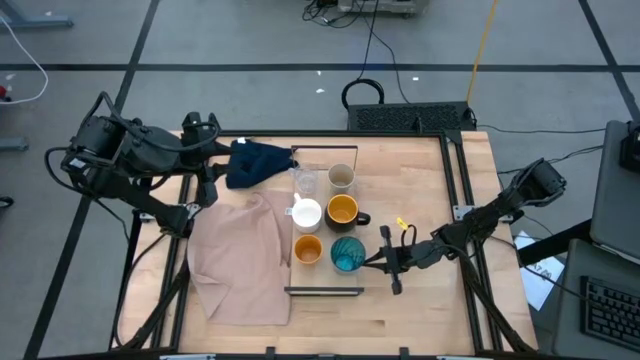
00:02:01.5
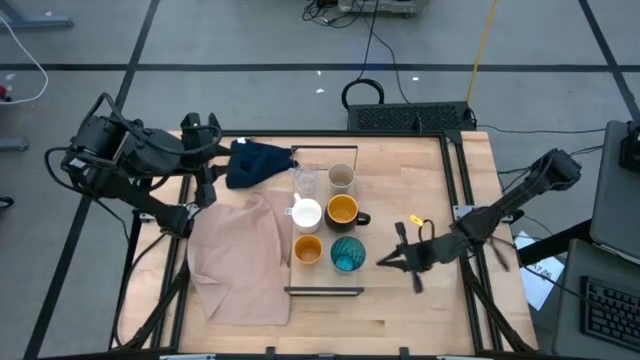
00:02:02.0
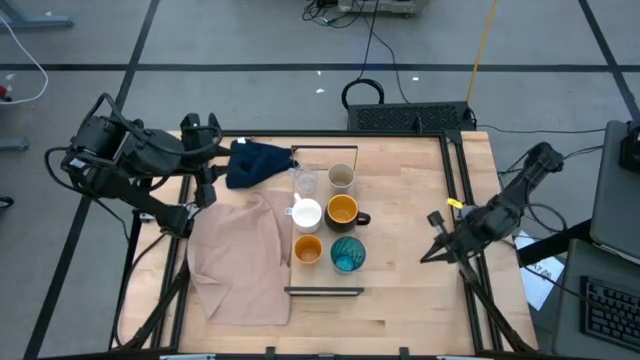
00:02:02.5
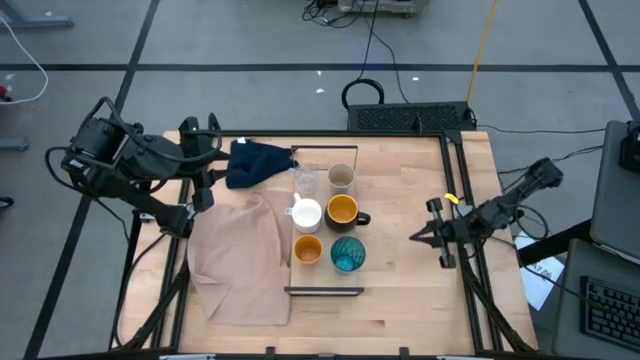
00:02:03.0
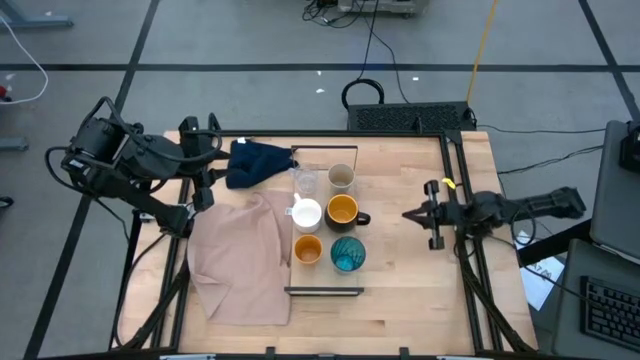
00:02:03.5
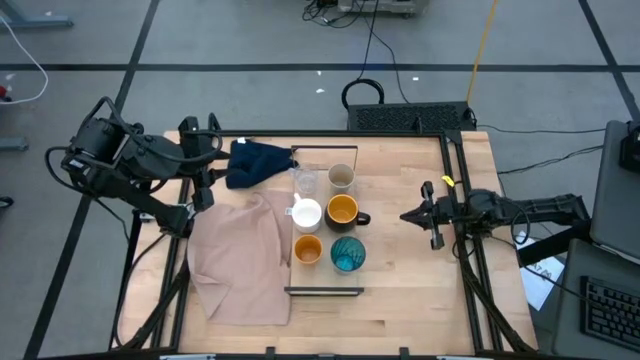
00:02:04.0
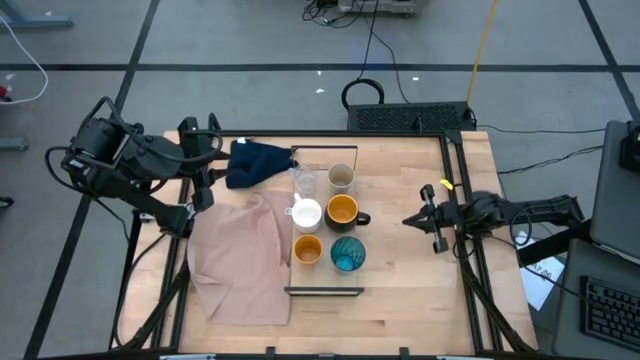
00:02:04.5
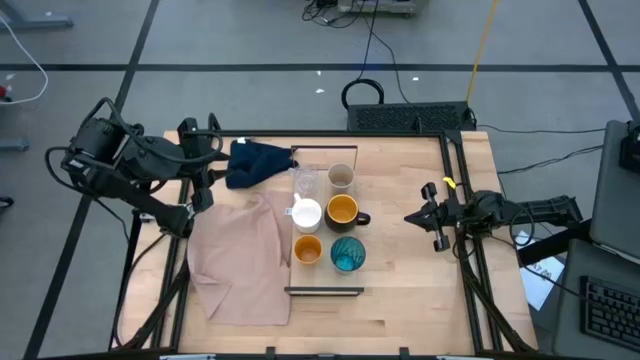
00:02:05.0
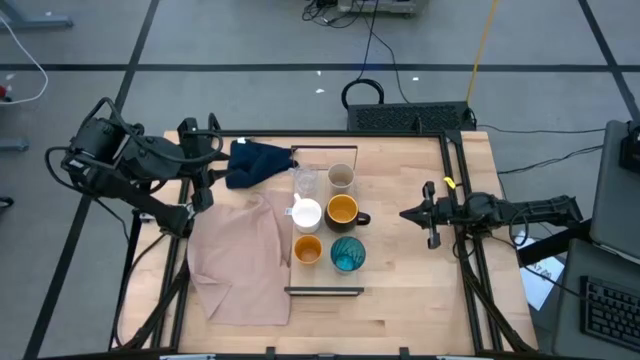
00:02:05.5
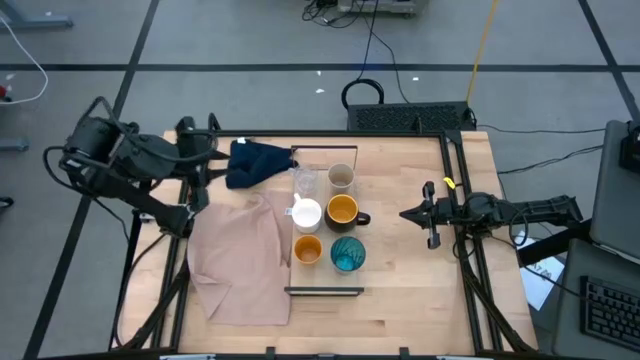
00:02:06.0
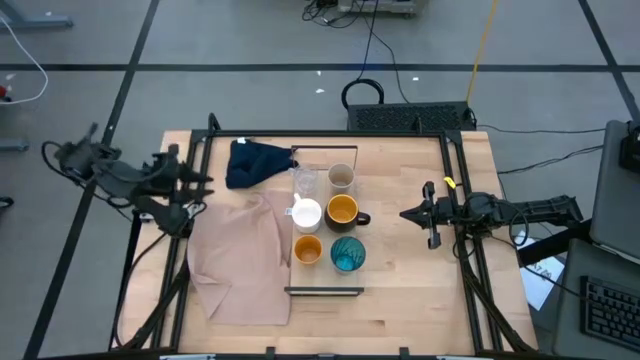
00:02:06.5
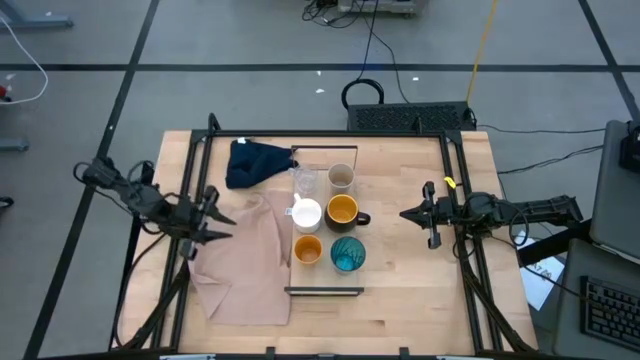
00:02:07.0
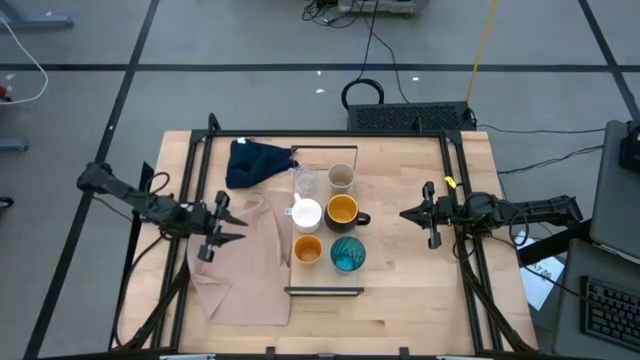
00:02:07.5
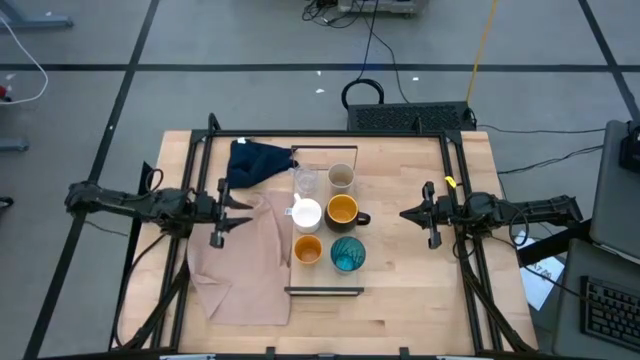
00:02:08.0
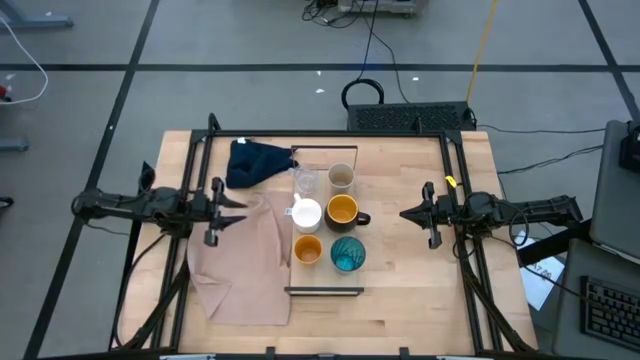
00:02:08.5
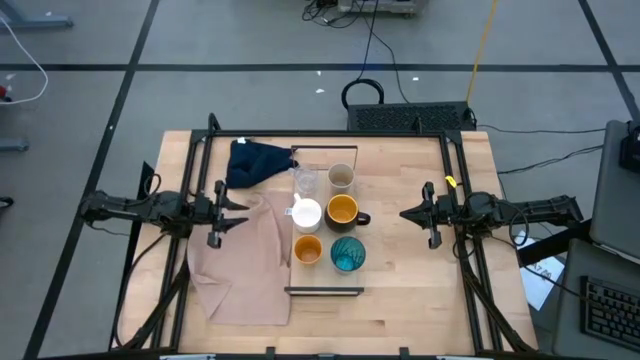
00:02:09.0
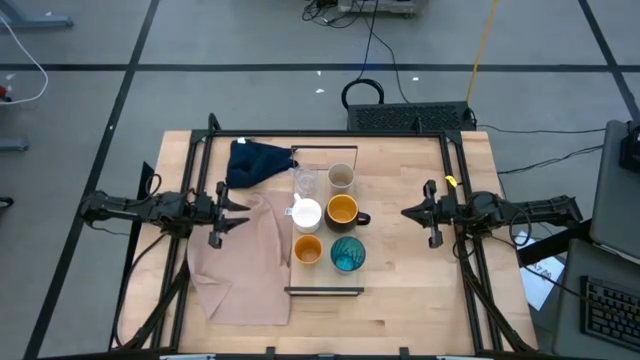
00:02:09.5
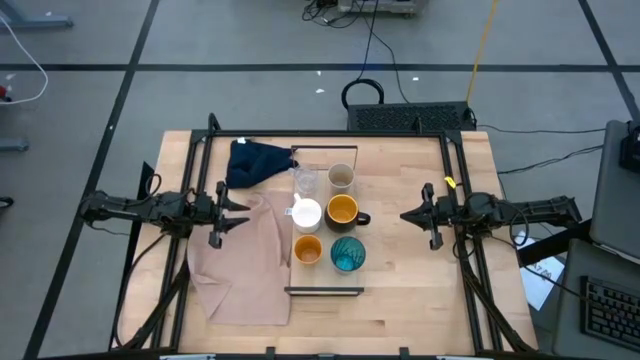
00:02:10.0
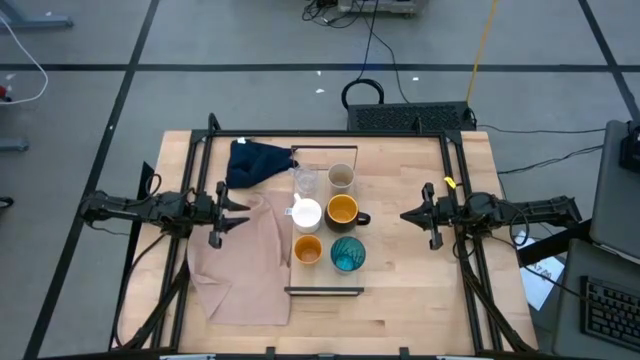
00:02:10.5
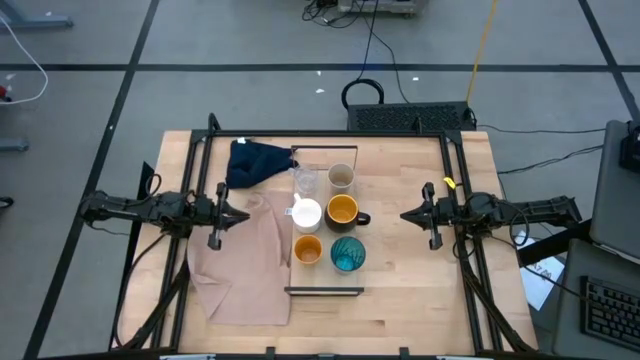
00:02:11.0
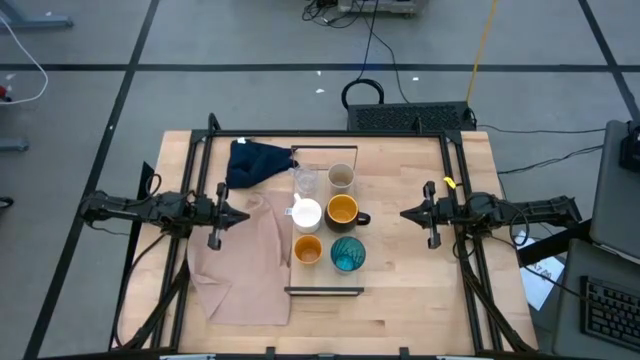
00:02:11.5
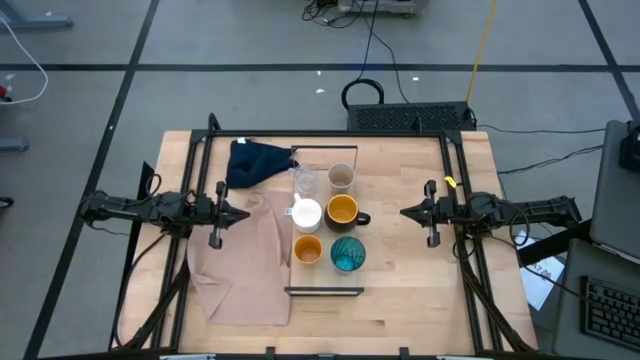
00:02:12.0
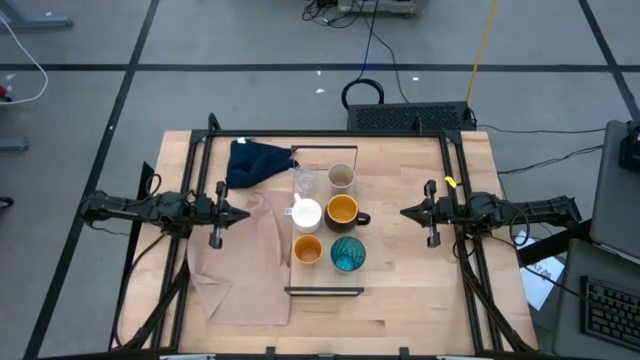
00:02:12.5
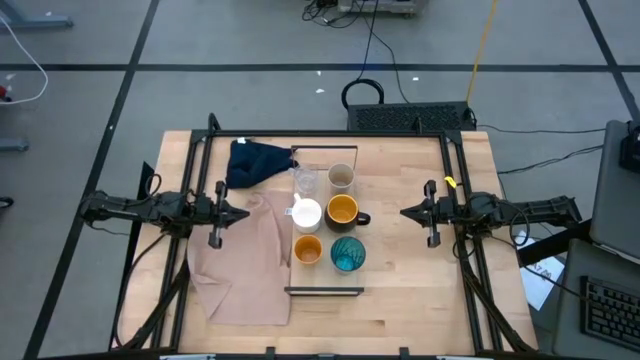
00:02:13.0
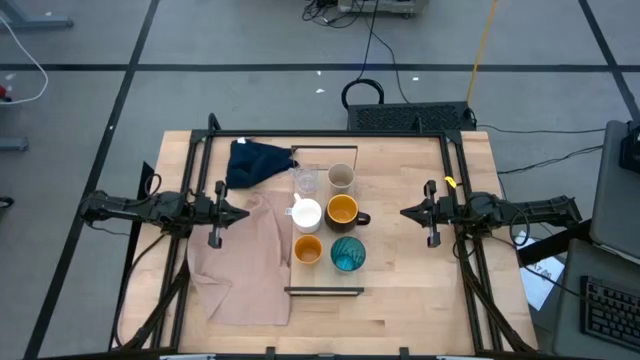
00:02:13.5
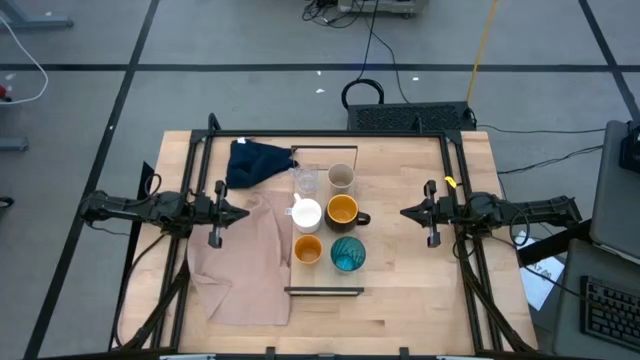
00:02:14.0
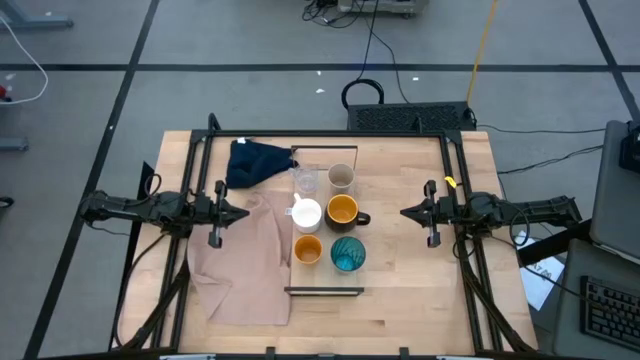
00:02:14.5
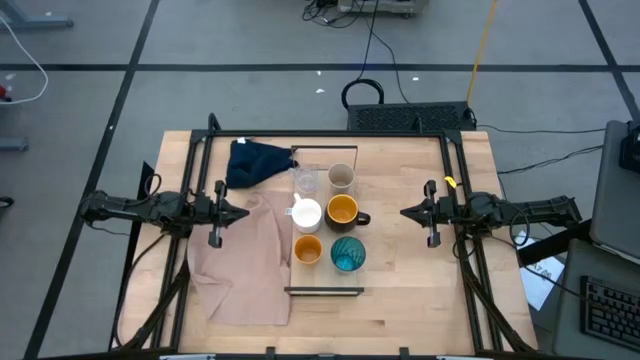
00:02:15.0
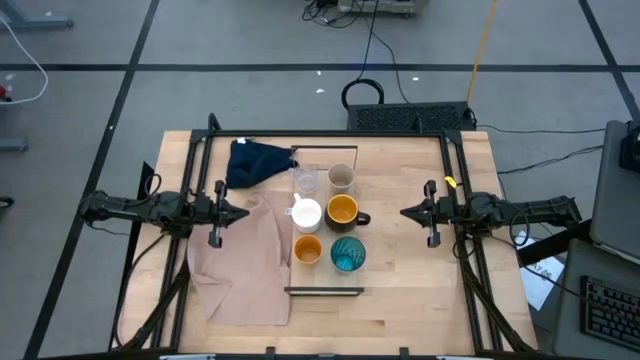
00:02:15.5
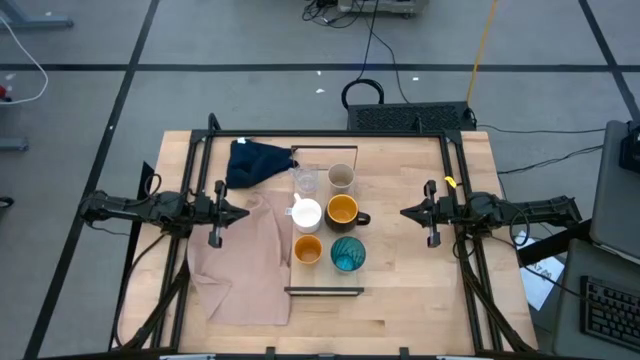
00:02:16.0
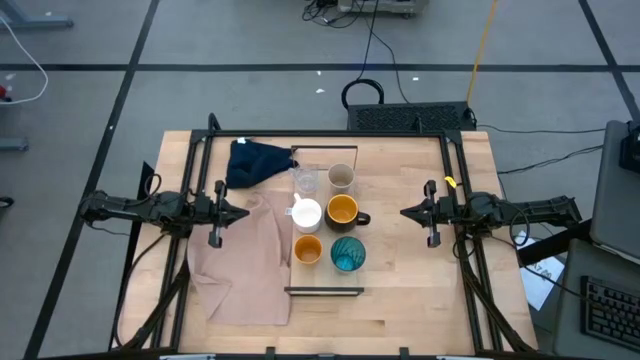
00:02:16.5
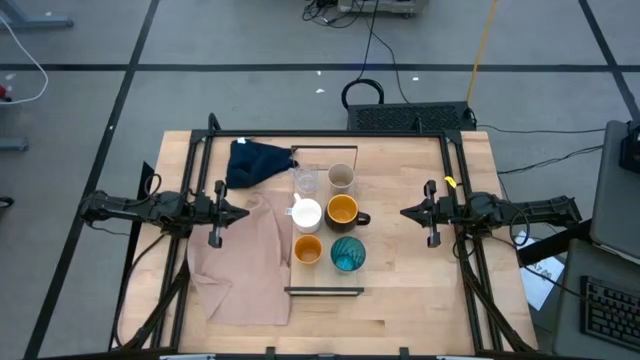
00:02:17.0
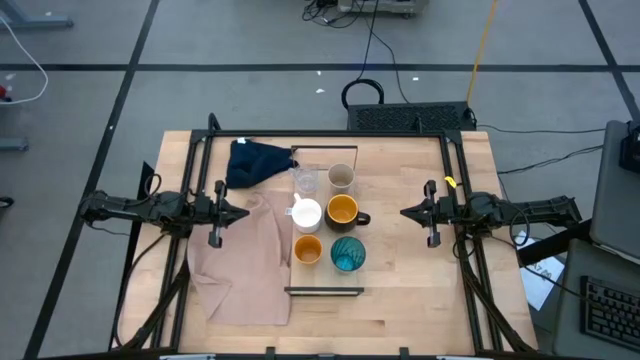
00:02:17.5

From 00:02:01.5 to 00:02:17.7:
Task: Stack small to large cups/mugs on shelf
Return to Home Position

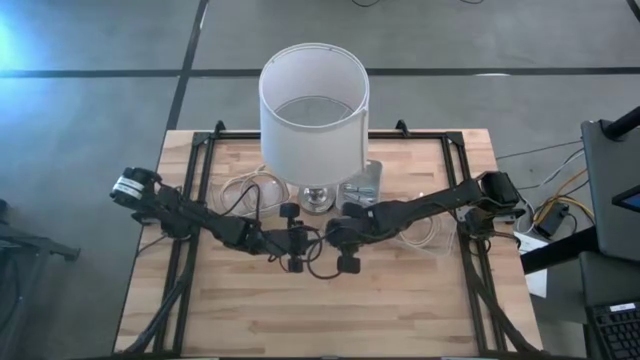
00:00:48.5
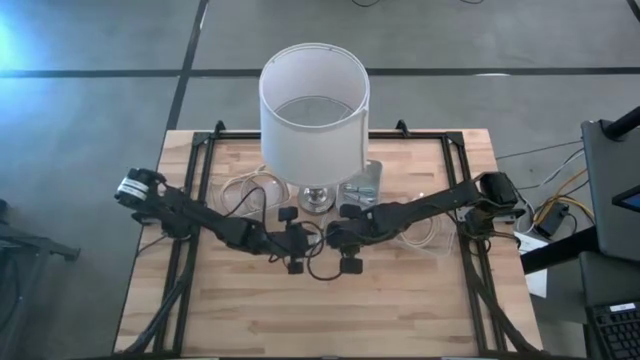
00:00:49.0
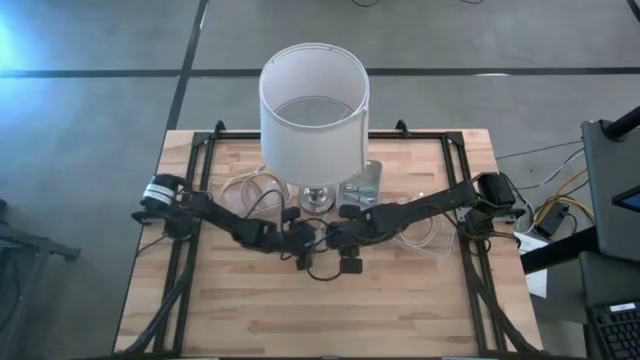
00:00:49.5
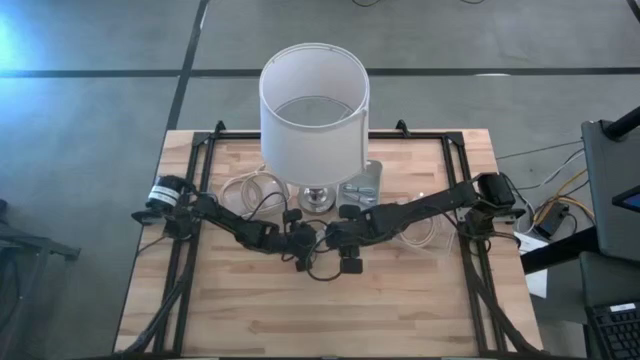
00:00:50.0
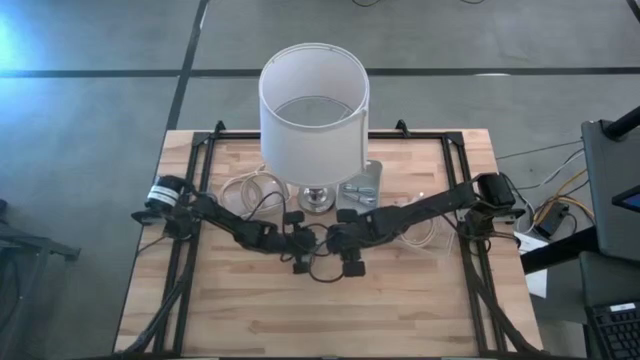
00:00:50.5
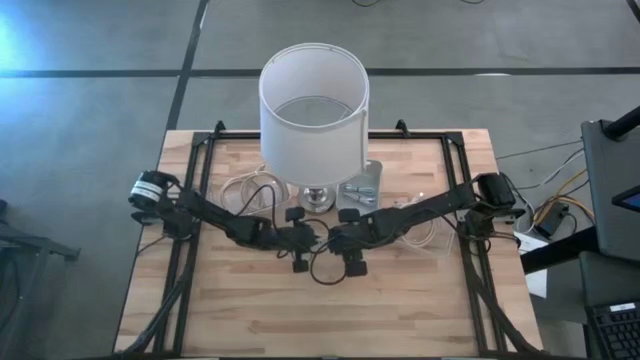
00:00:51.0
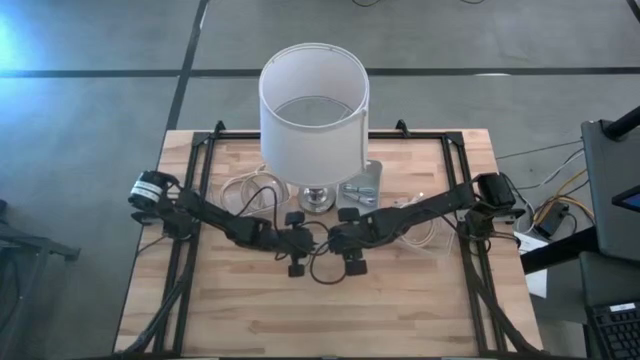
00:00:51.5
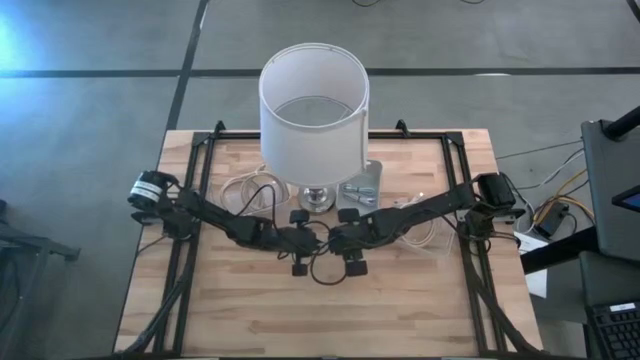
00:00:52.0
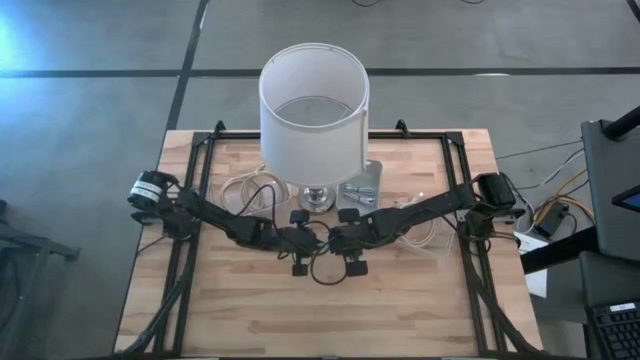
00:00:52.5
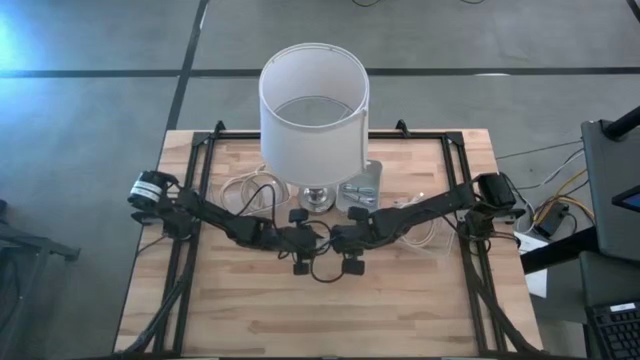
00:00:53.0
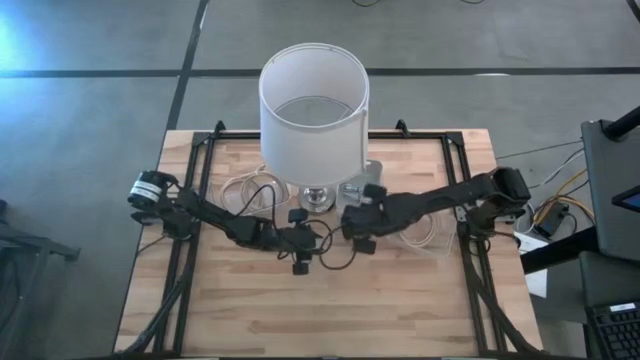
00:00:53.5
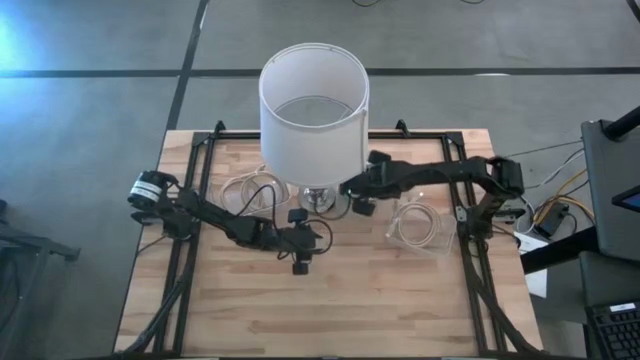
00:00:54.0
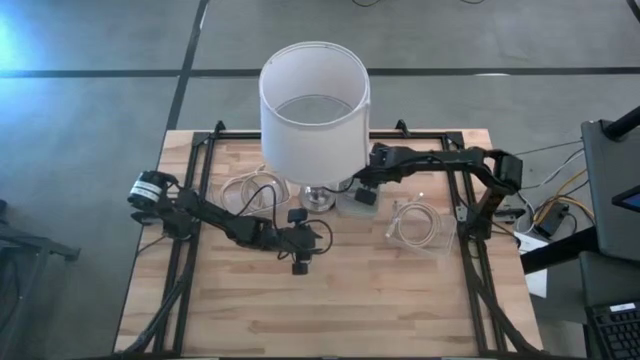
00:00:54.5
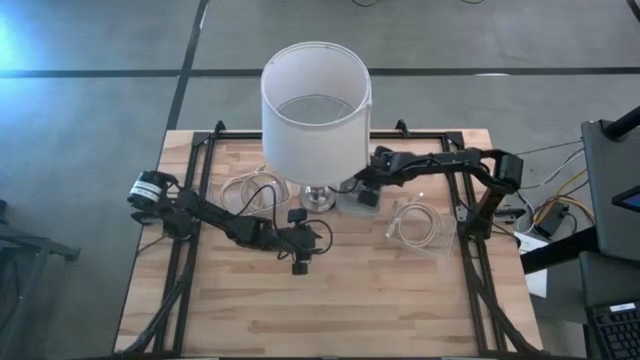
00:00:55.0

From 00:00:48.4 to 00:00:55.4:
Task: Pick & Place USB Port
Put the blue charger cable into the gray bin
